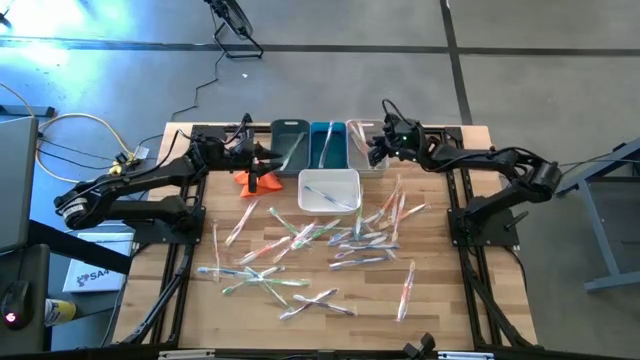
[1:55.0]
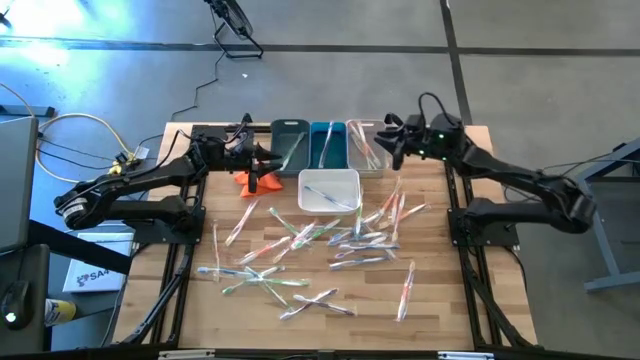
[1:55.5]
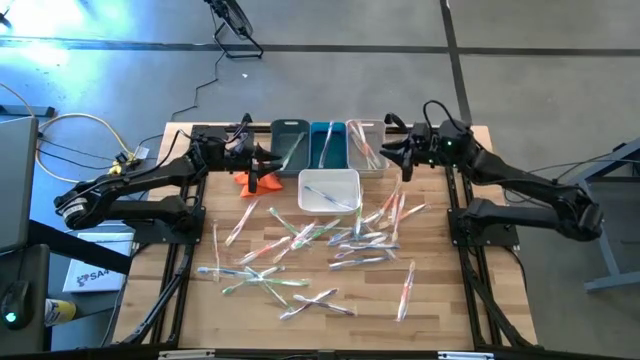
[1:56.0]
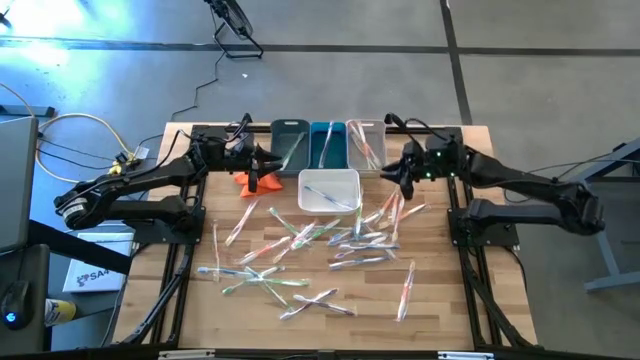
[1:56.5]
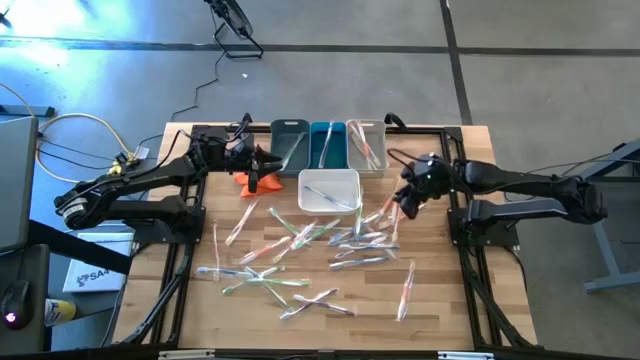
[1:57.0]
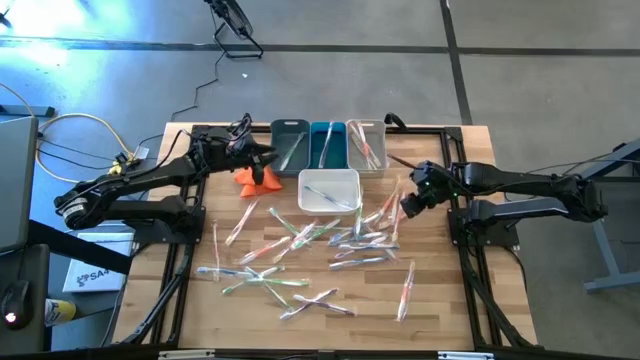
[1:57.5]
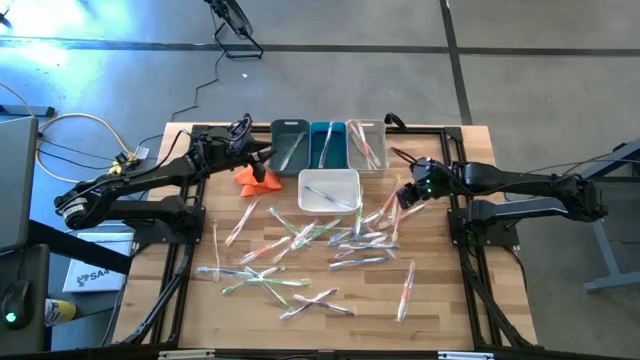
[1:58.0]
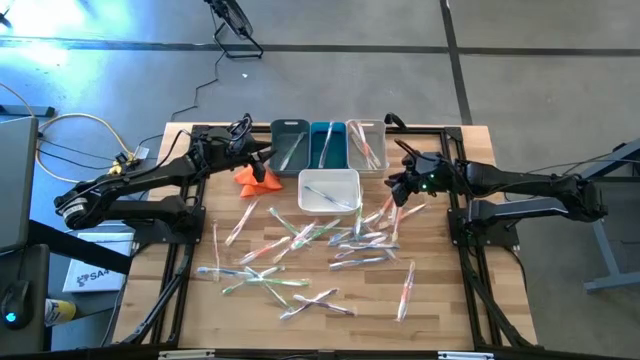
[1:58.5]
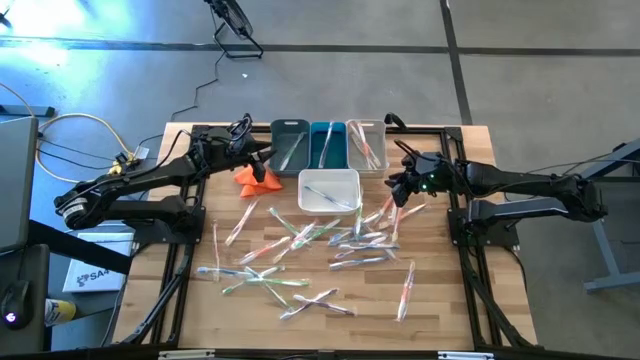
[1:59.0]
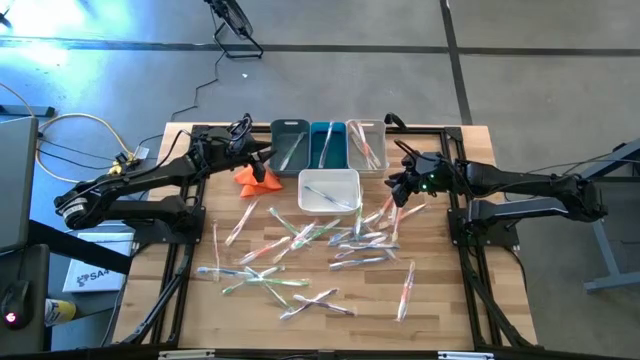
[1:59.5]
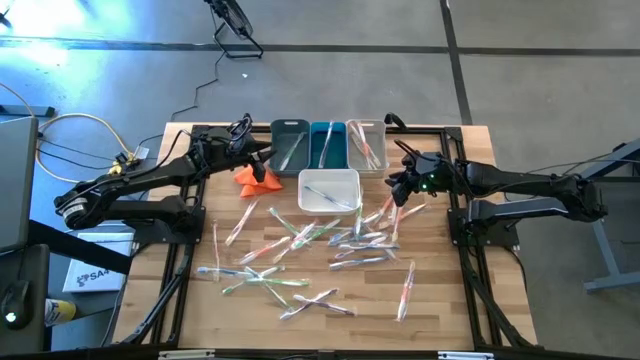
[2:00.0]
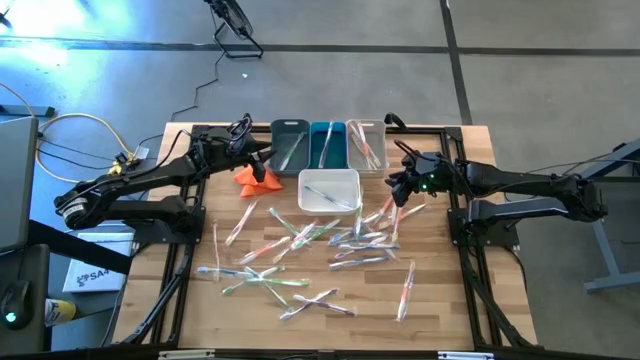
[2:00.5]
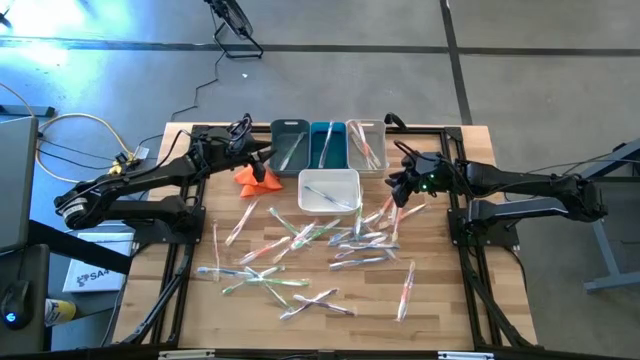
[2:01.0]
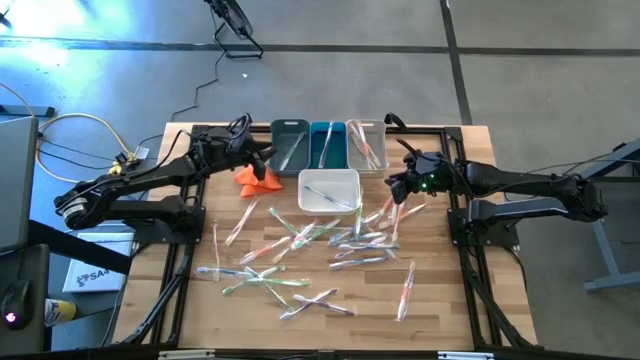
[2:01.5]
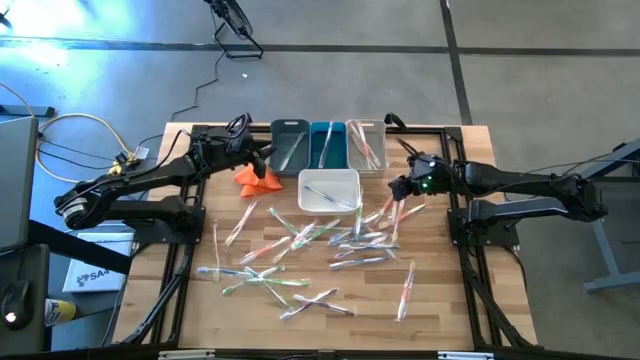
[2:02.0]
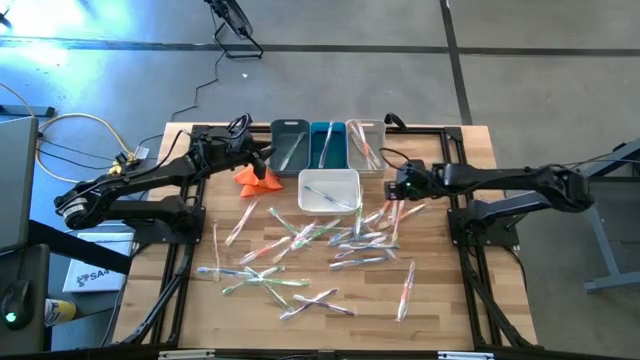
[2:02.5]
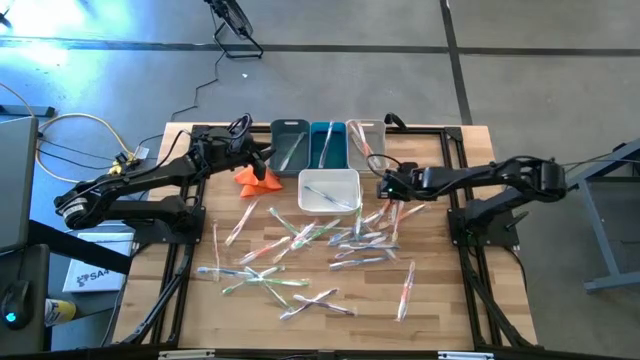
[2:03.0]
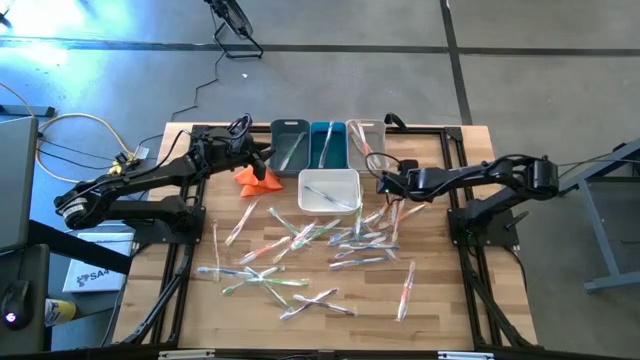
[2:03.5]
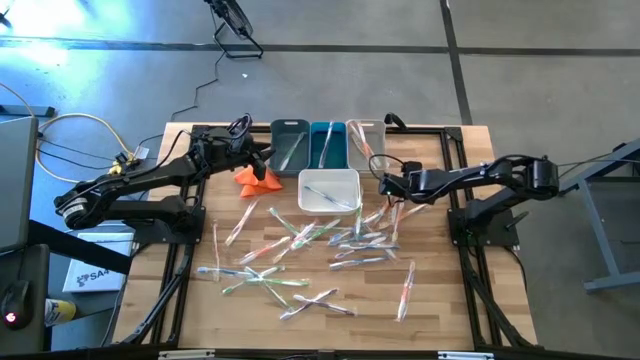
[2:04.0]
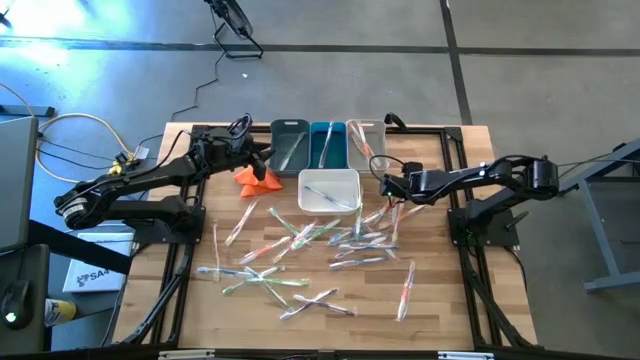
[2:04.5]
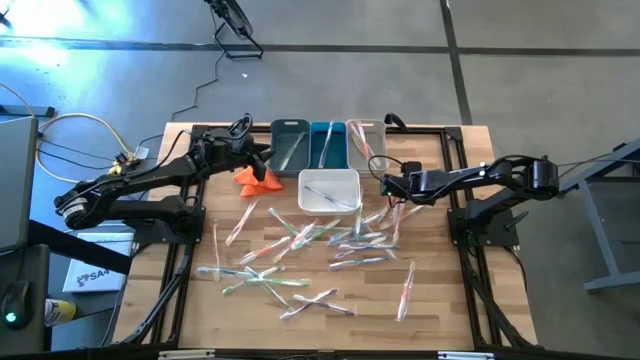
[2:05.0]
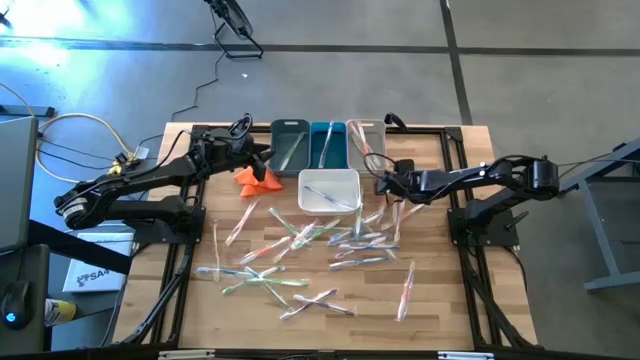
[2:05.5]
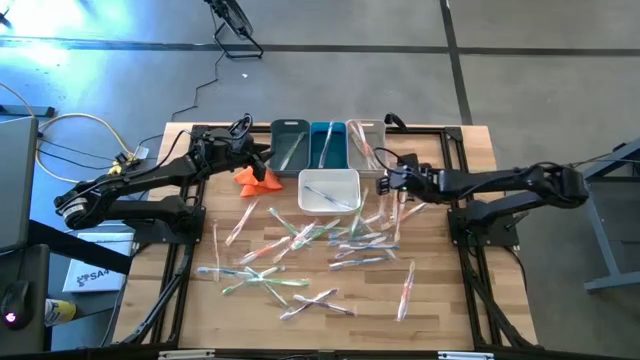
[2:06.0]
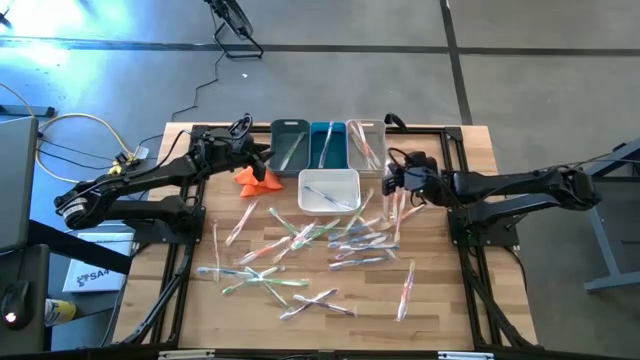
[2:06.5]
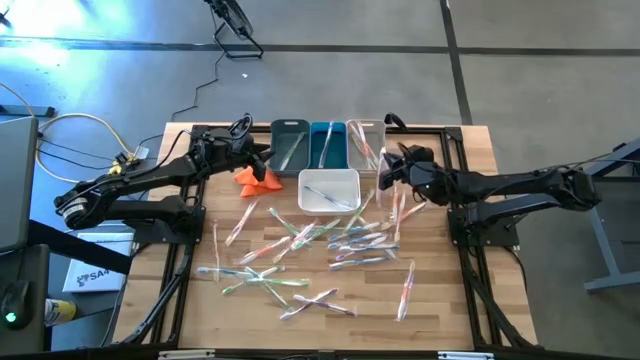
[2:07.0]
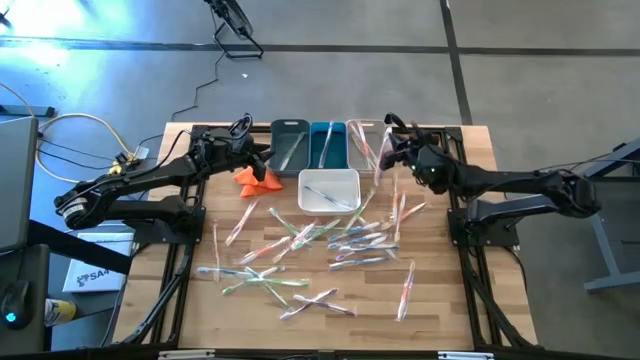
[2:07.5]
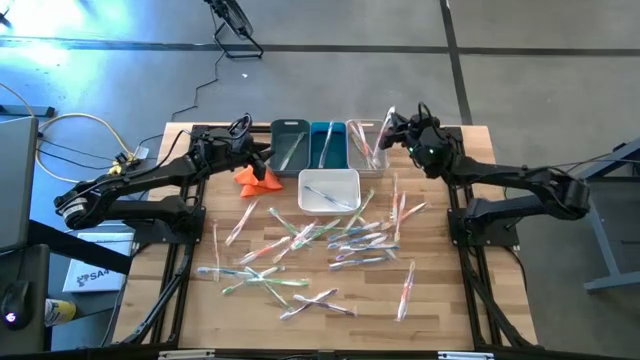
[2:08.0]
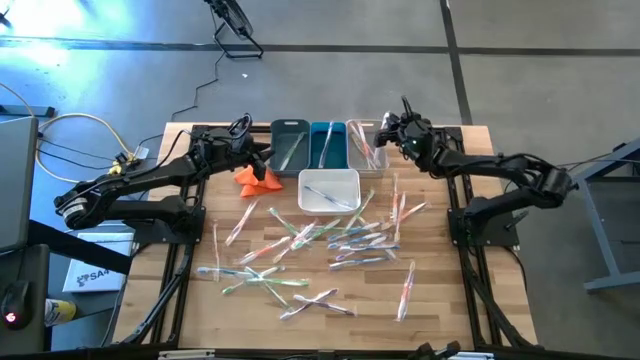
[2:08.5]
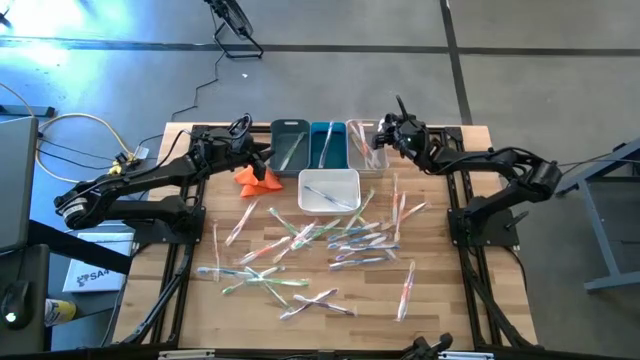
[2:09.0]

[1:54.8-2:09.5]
Task: Pick & Place Toothbrushes
Put the orange toothbrush into the gray bin

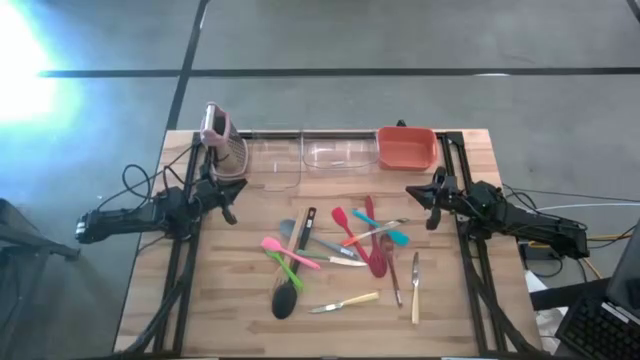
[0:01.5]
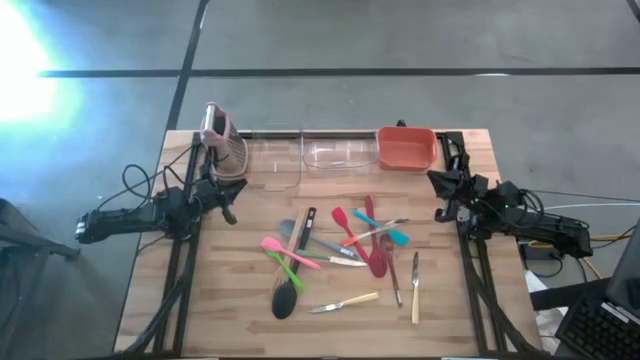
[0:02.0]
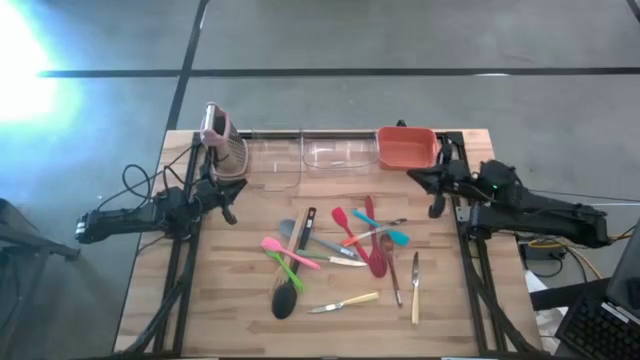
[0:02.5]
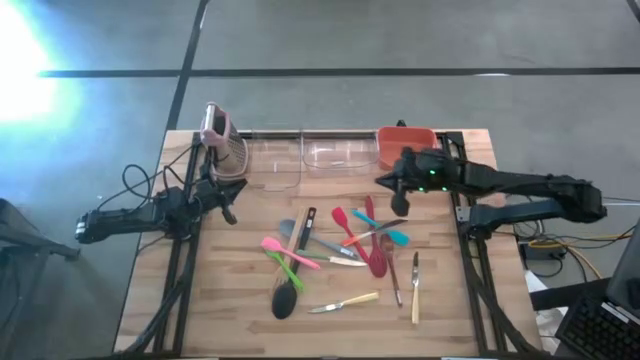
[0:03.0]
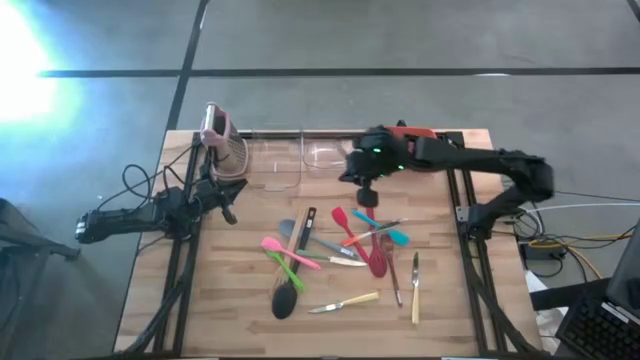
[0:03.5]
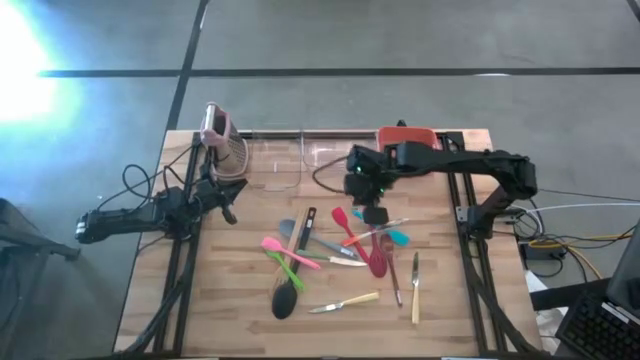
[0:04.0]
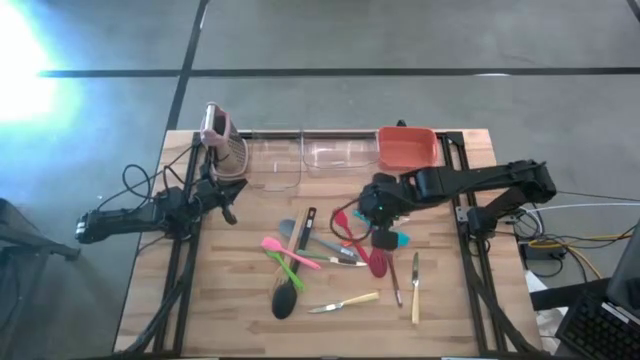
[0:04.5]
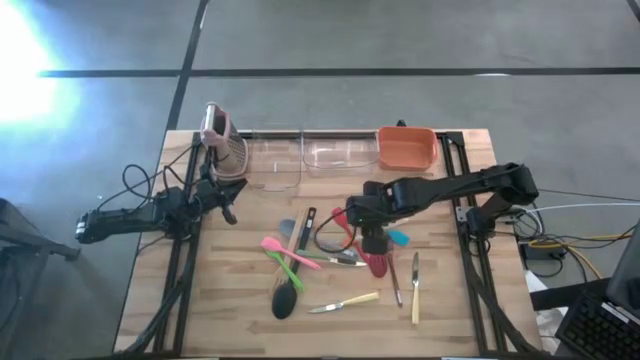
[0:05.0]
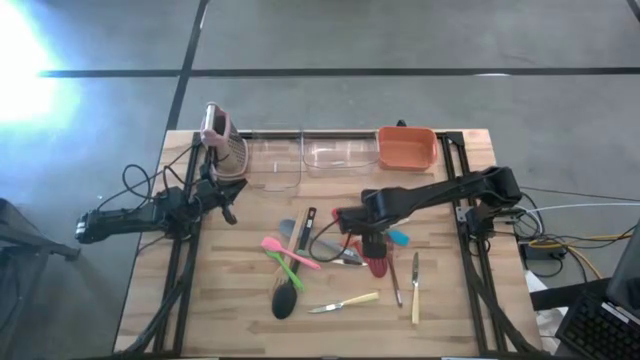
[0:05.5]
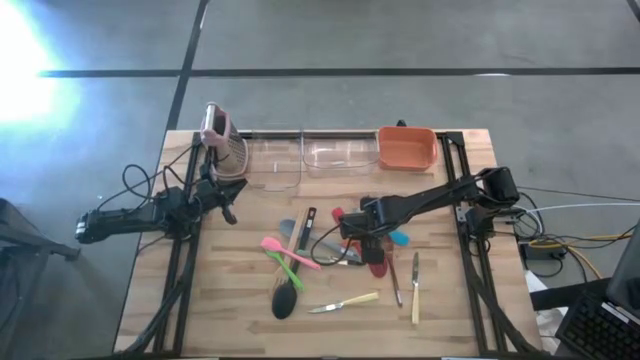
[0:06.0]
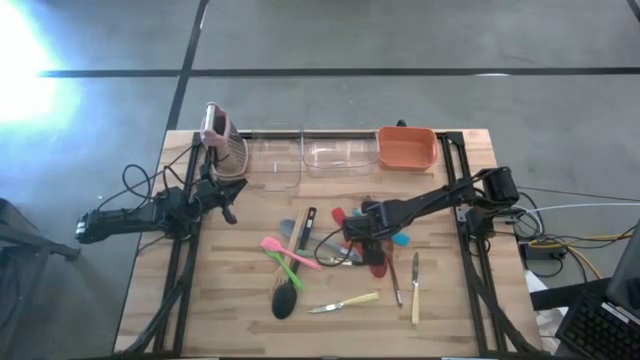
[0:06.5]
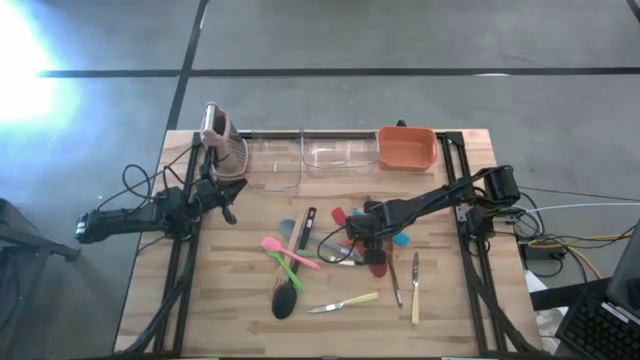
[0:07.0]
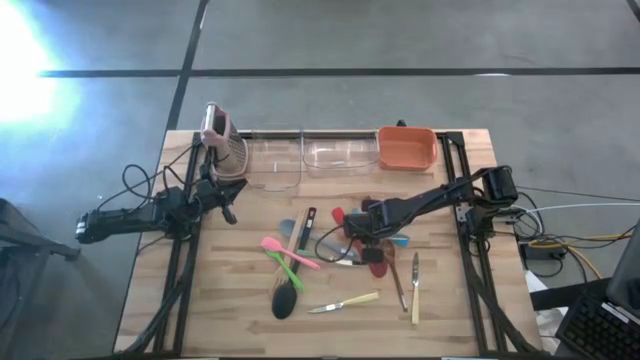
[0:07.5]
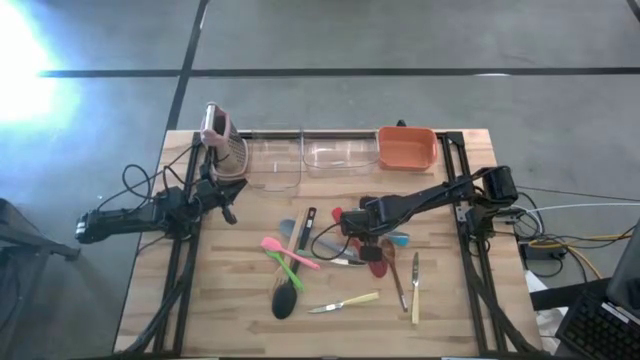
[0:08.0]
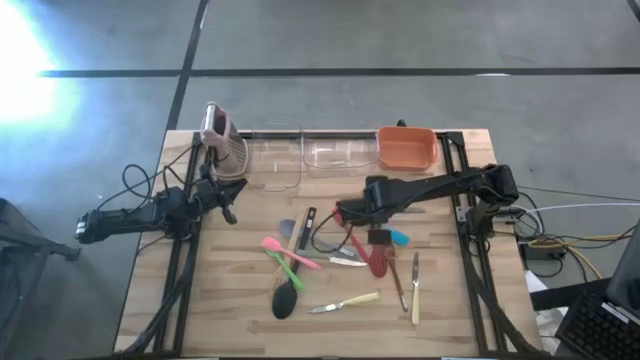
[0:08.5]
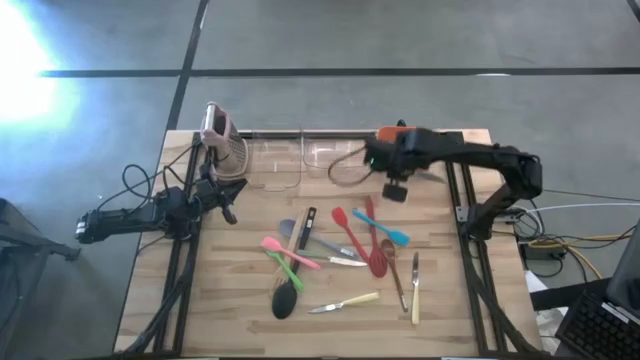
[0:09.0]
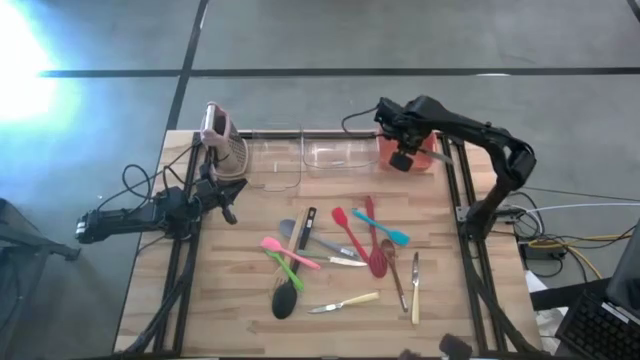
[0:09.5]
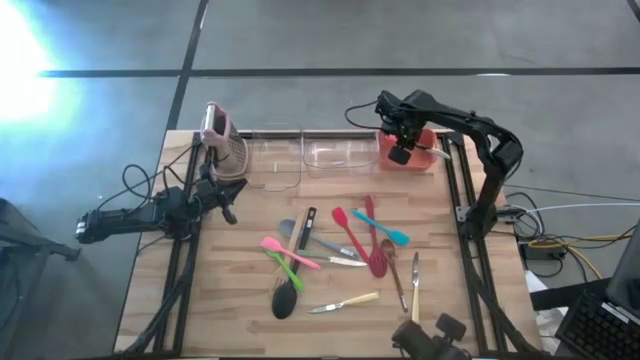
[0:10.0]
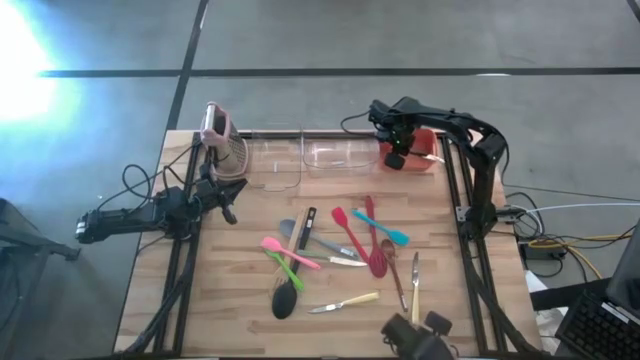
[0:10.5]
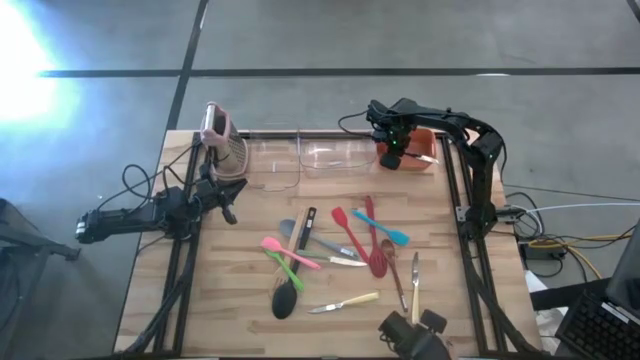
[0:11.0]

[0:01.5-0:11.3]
Task: Pick & Place Kitchen Items
Put the orange knife into the orange bin
